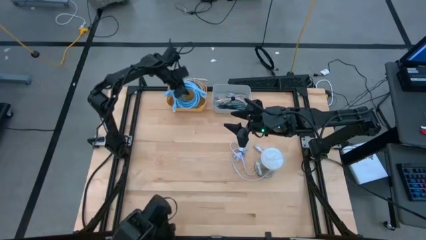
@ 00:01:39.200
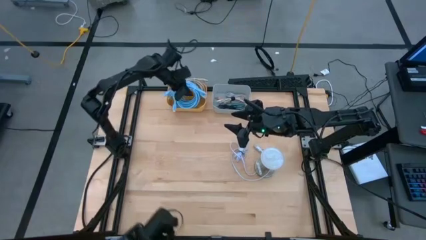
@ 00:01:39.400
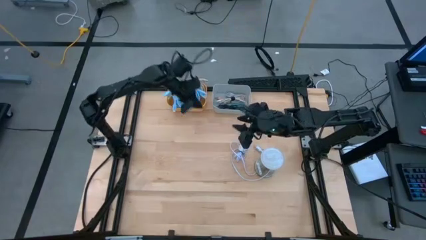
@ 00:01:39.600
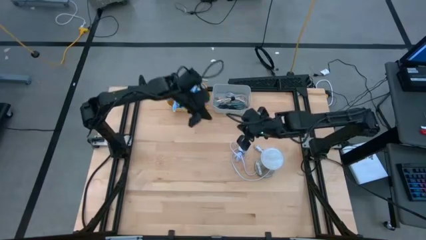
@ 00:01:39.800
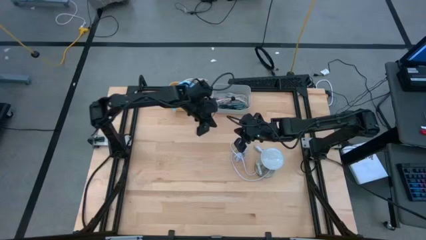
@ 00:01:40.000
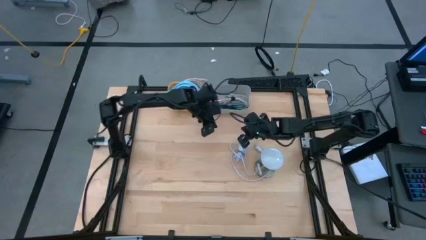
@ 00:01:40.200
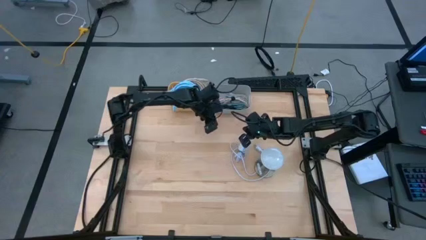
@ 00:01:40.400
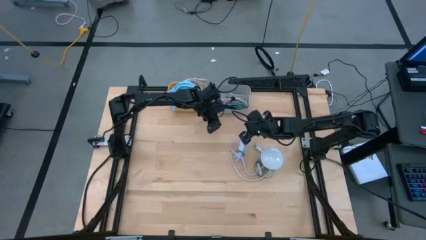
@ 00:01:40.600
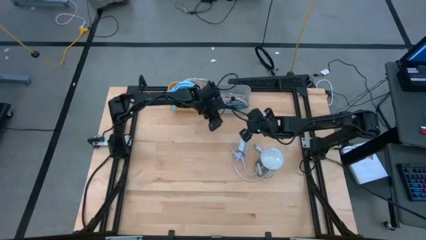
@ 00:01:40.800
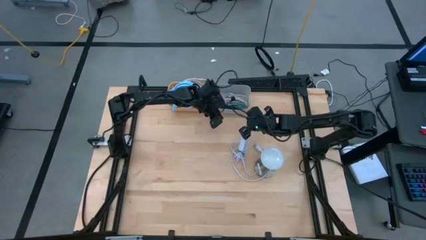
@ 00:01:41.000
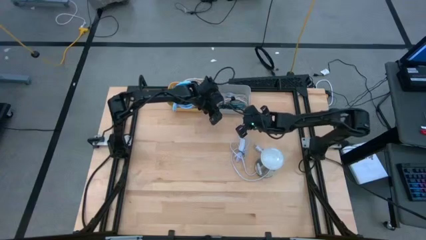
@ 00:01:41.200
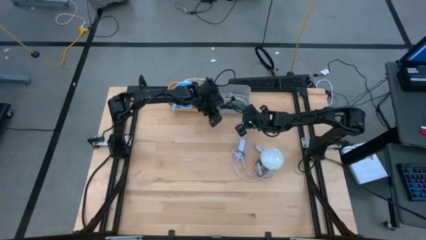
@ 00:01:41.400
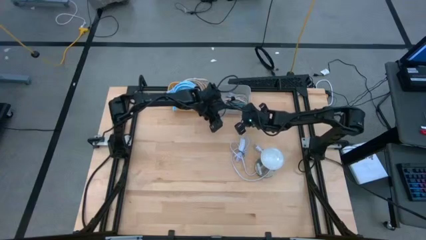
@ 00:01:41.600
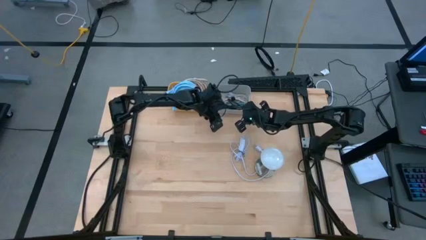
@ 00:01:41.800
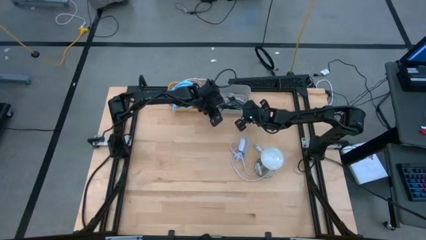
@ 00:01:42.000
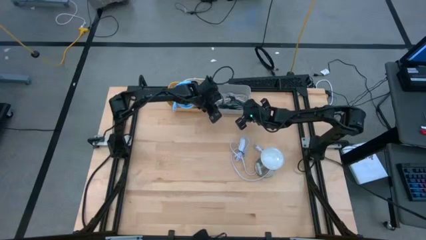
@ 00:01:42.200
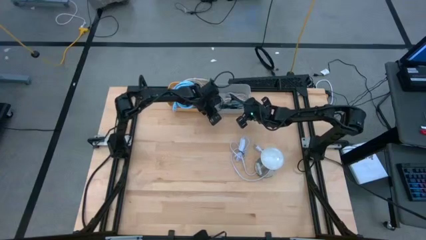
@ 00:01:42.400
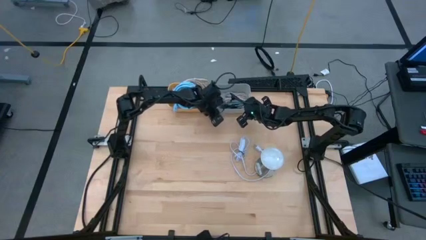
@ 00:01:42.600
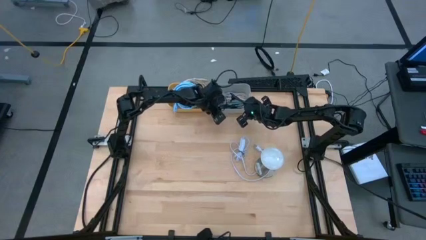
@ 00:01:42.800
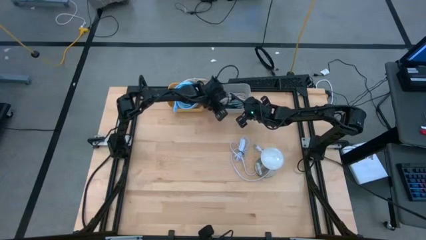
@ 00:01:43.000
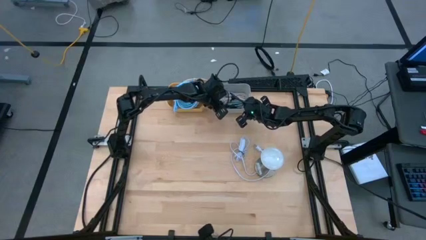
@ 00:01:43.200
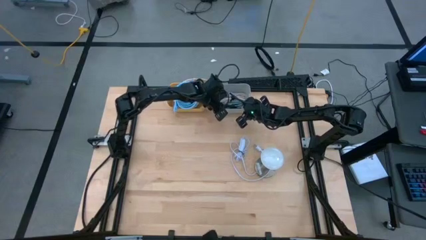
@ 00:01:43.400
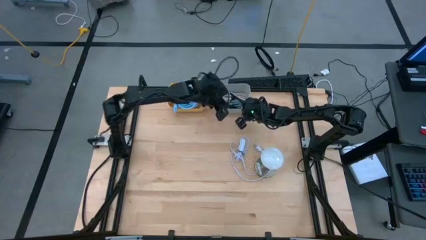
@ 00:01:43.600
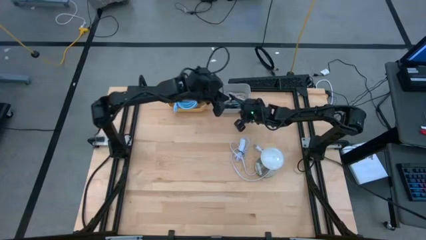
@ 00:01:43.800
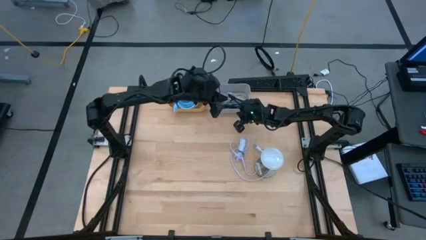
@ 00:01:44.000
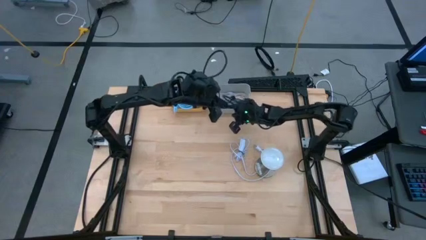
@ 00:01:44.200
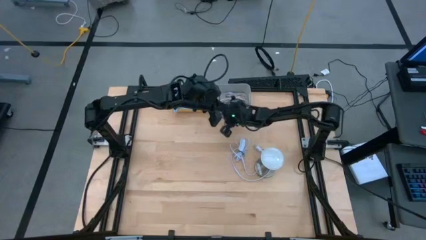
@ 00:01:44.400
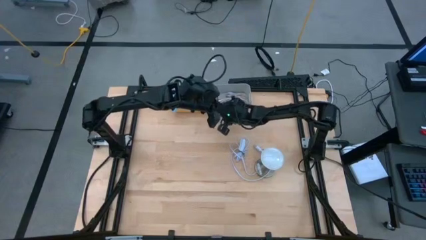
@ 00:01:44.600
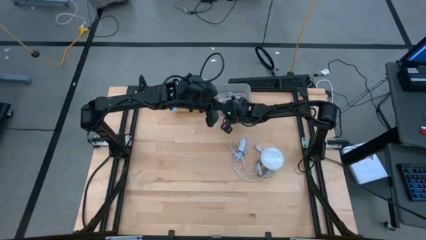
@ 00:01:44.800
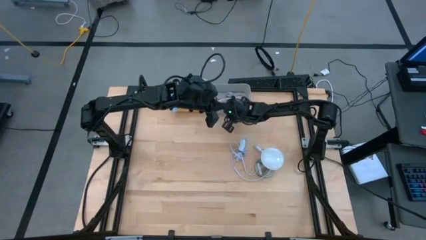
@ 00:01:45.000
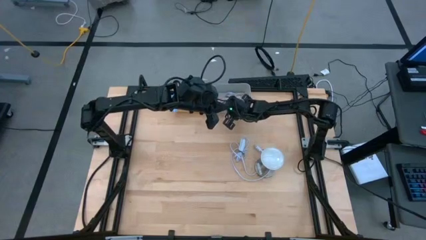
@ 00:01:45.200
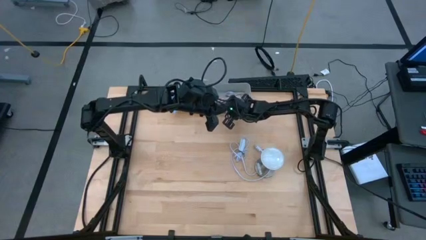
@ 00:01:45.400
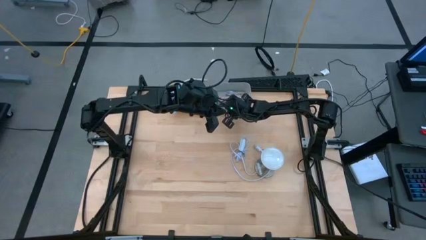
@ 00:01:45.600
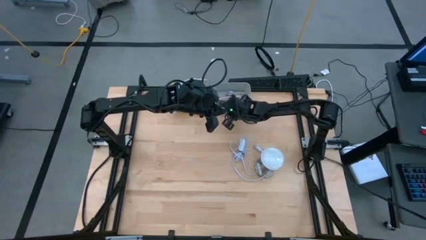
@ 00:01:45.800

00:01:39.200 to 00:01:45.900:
Task: Pick & Place USB Port
Adjust the gray bin

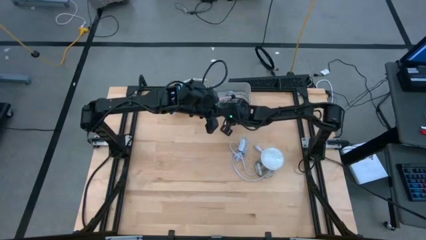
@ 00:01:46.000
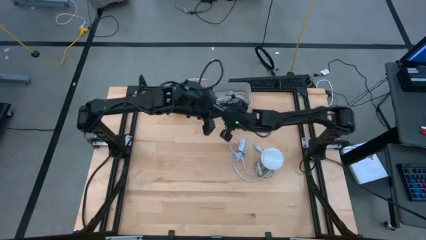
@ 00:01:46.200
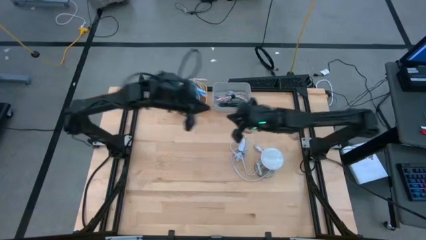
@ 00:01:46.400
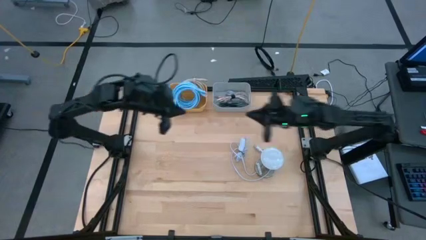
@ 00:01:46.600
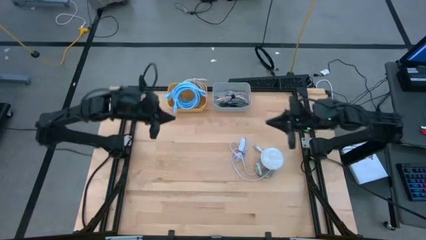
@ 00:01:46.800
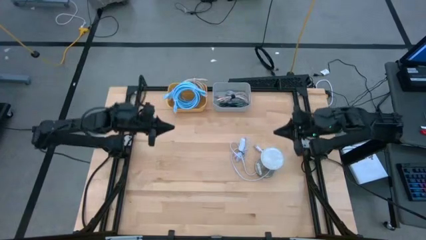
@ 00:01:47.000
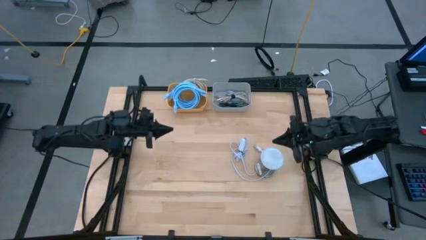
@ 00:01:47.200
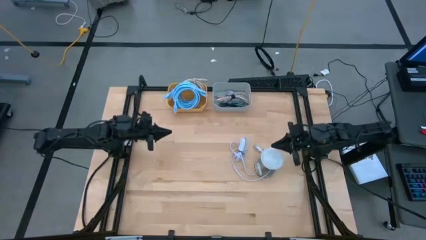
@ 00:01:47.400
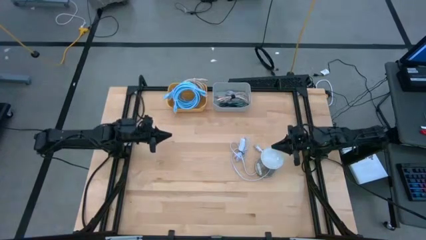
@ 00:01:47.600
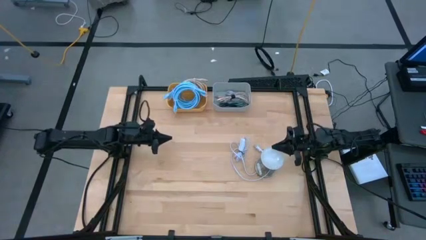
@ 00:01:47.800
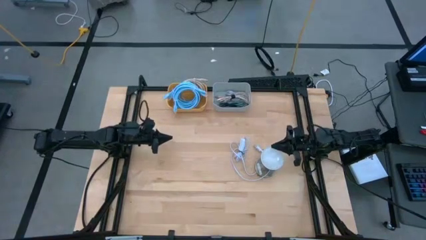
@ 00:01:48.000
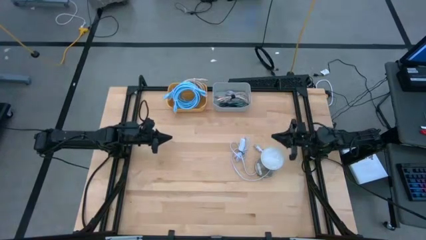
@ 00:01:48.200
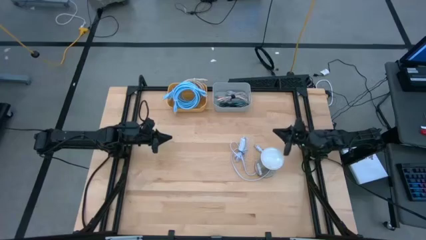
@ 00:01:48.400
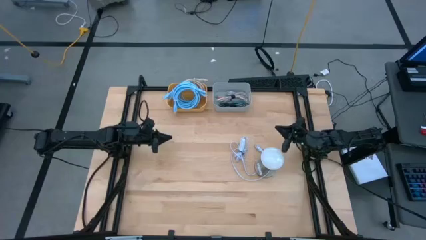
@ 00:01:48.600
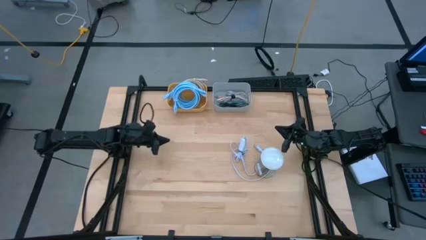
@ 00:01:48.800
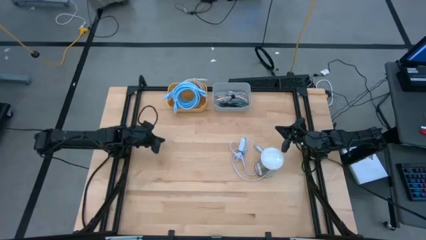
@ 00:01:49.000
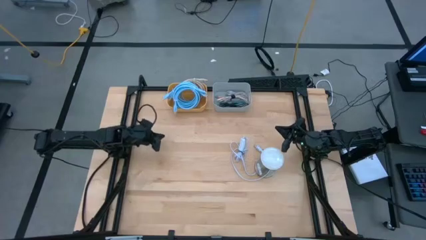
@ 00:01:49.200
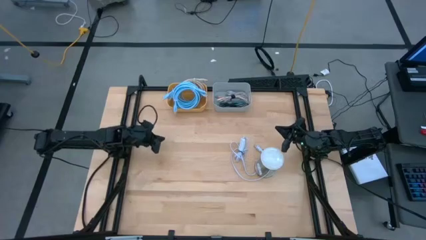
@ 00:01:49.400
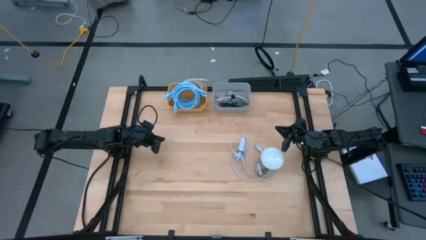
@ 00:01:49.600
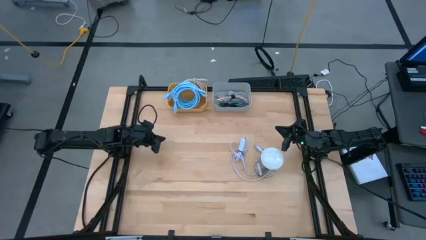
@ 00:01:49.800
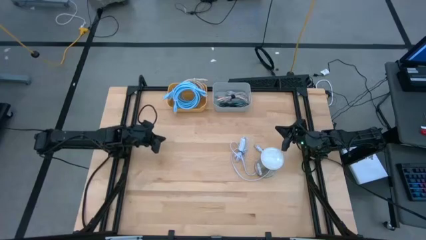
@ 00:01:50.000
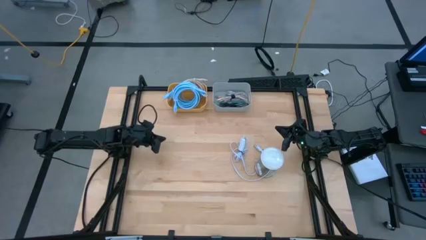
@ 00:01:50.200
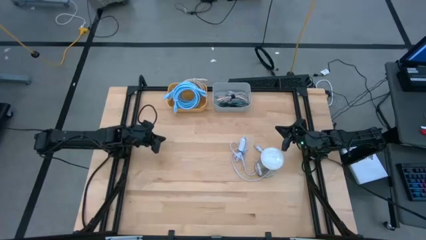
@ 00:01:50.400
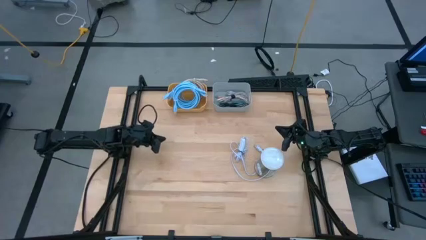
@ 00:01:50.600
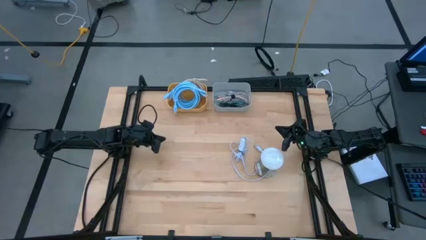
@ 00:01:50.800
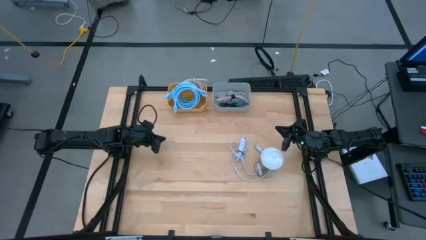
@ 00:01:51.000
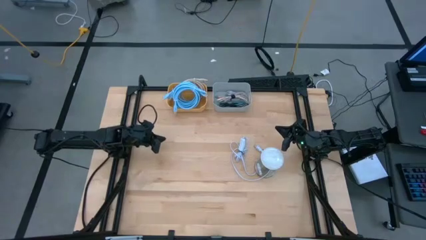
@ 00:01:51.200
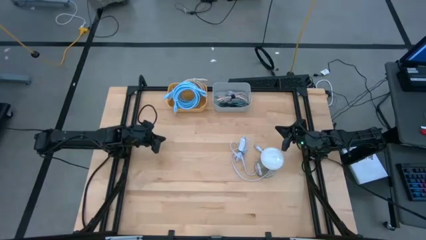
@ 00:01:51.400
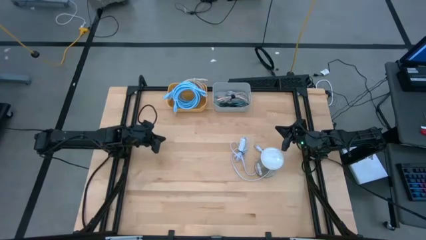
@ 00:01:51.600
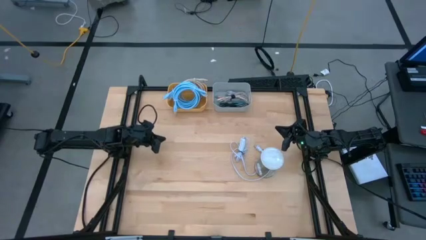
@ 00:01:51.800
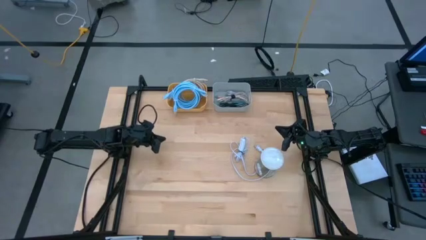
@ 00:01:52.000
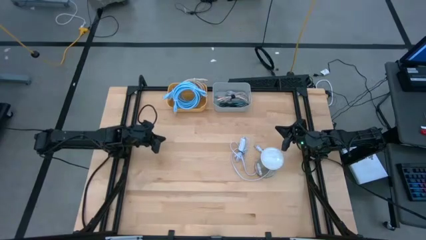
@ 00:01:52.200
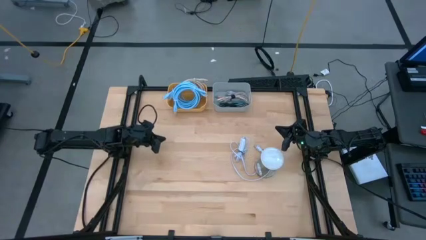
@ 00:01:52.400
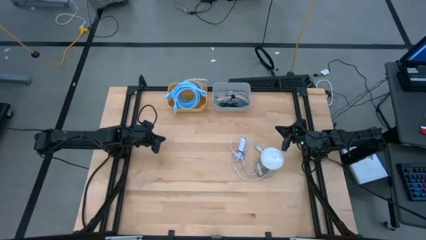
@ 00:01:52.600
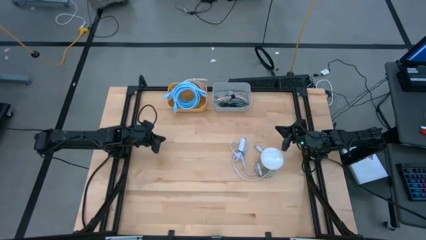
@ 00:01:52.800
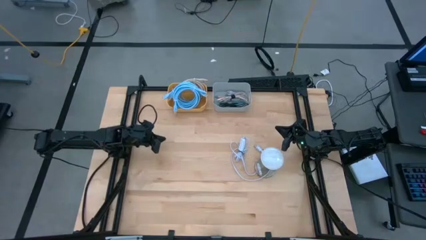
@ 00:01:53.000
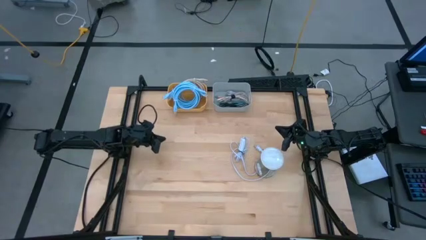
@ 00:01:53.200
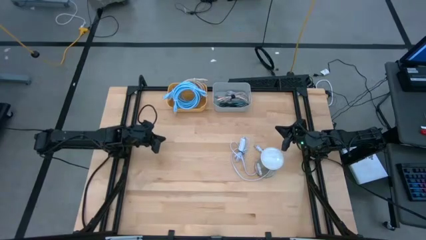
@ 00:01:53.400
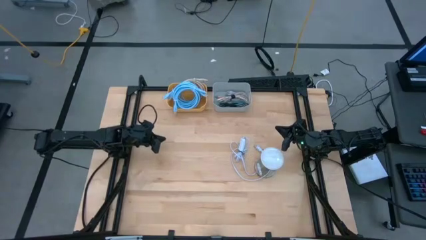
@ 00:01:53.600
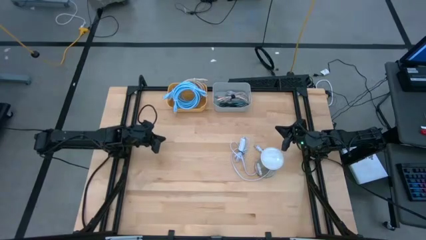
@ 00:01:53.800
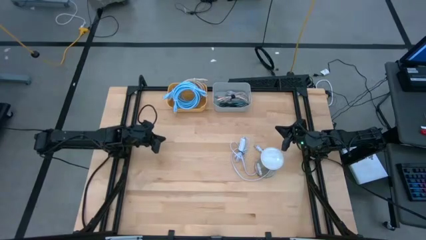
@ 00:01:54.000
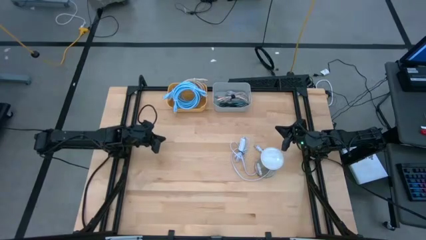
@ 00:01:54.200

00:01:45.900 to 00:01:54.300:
Return to Home Position
